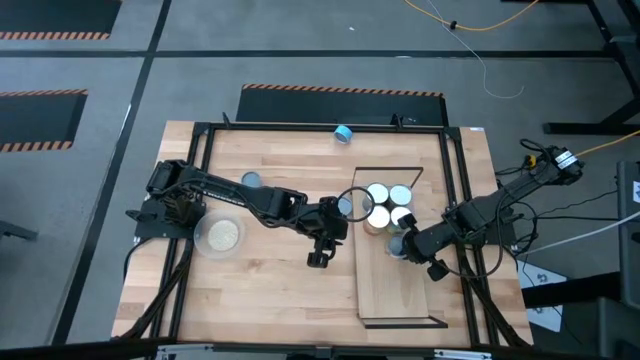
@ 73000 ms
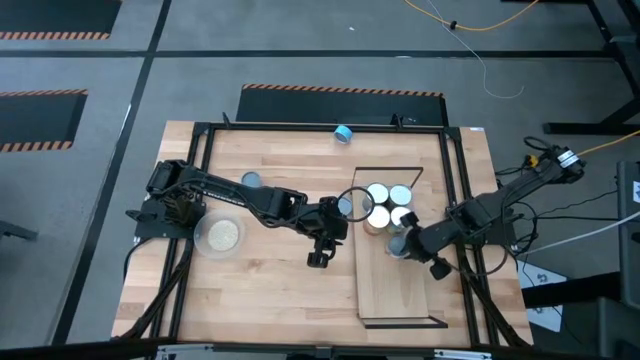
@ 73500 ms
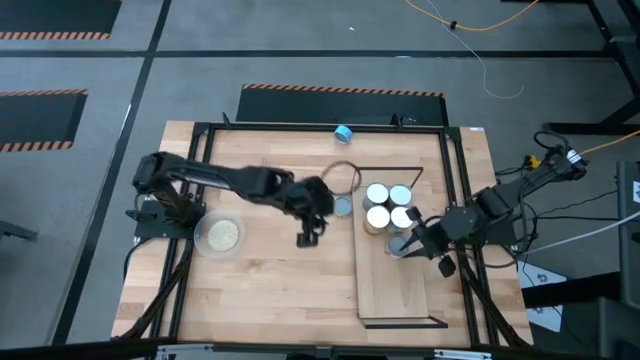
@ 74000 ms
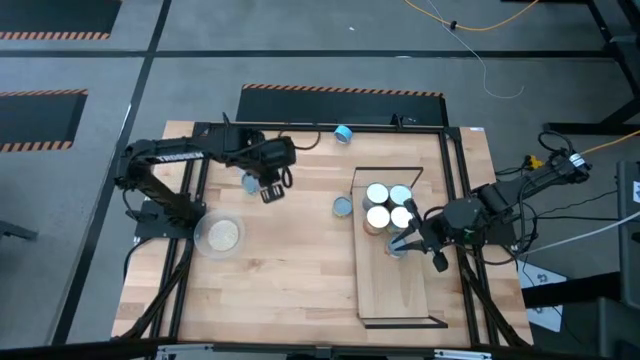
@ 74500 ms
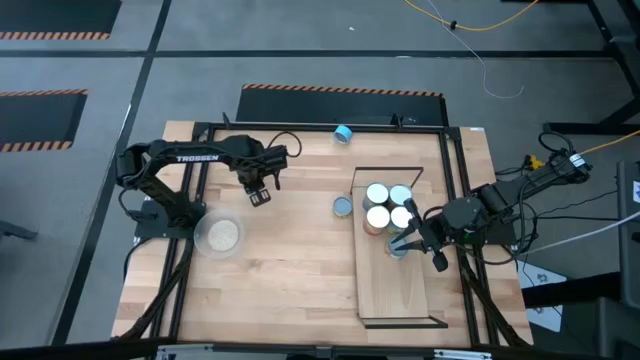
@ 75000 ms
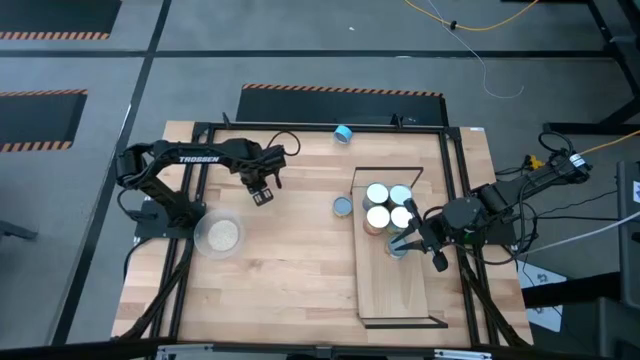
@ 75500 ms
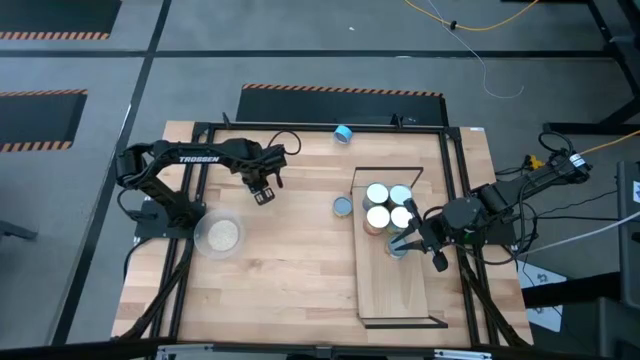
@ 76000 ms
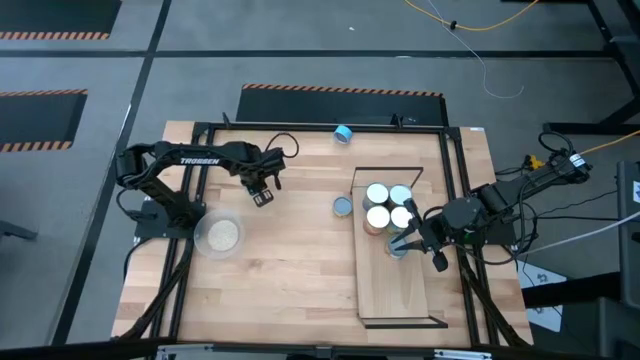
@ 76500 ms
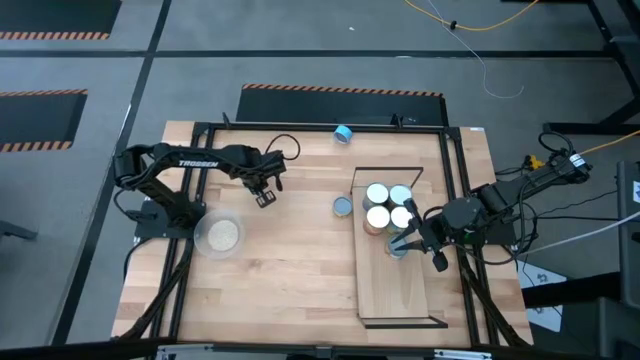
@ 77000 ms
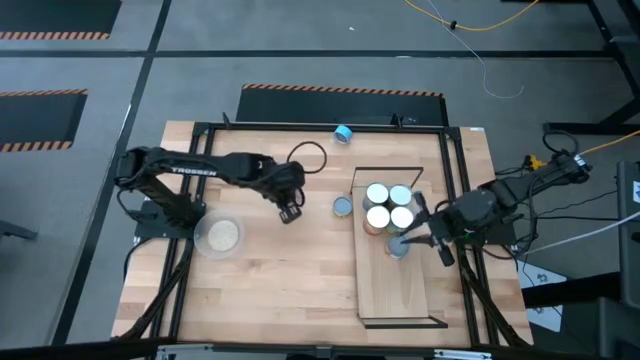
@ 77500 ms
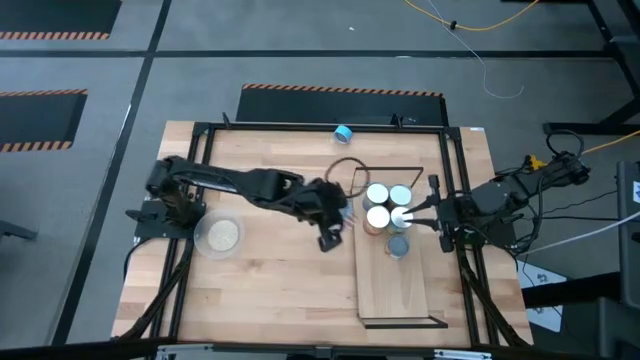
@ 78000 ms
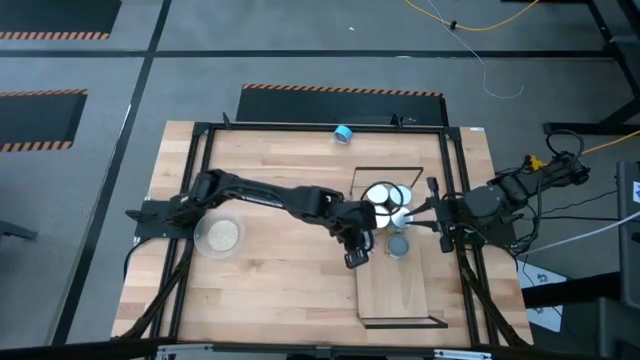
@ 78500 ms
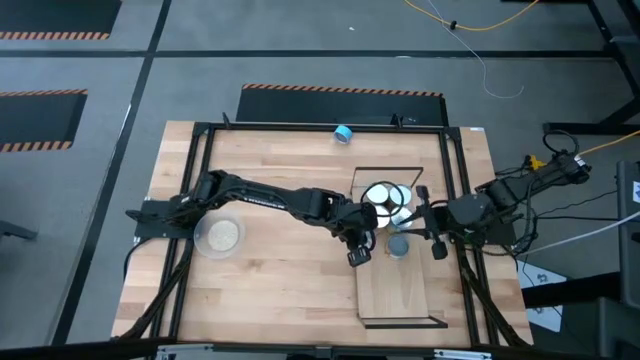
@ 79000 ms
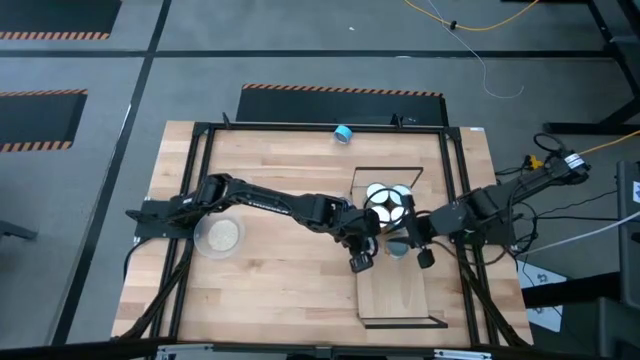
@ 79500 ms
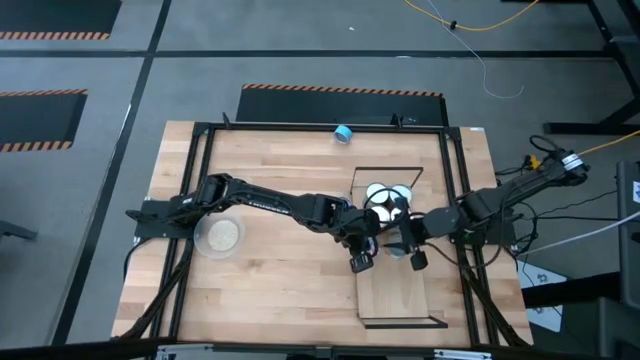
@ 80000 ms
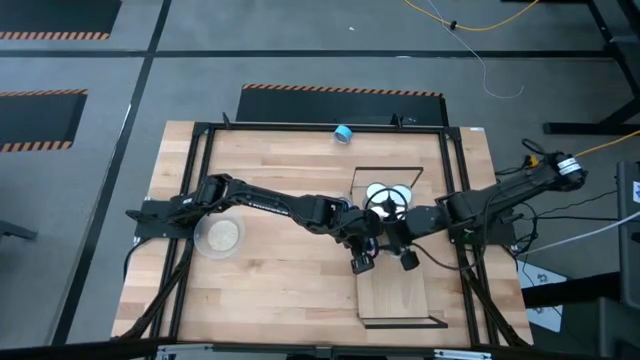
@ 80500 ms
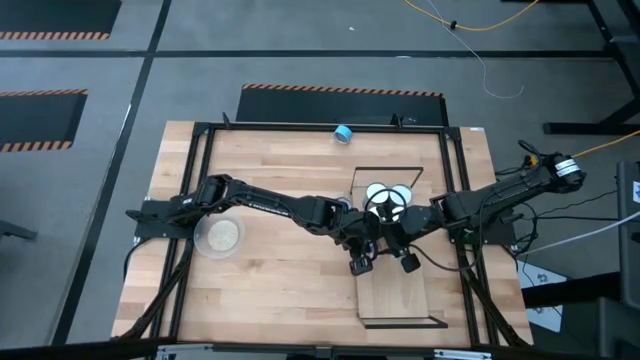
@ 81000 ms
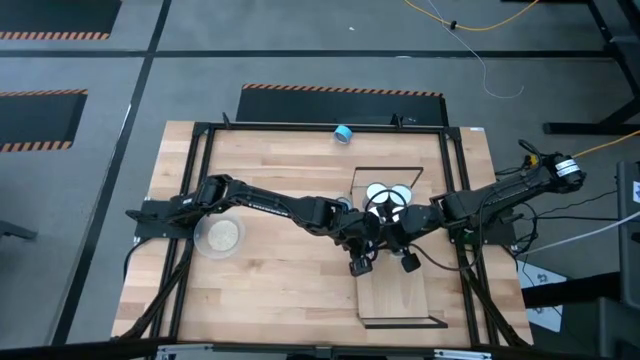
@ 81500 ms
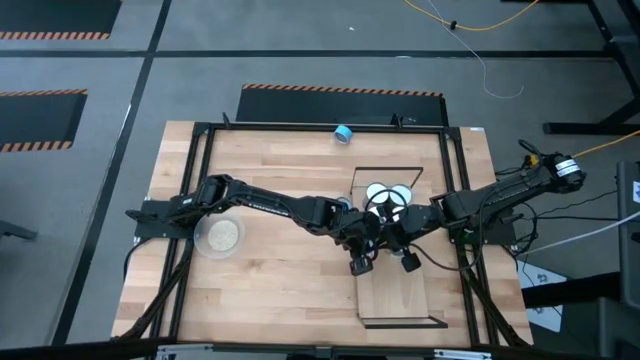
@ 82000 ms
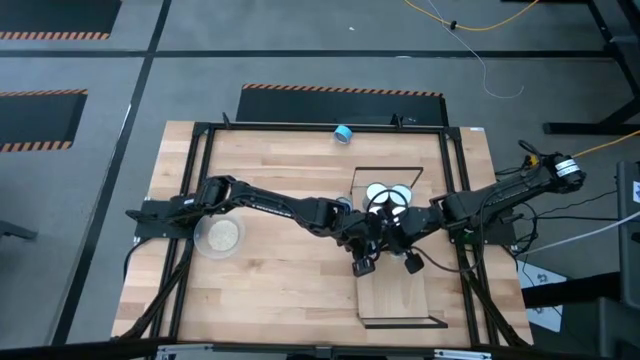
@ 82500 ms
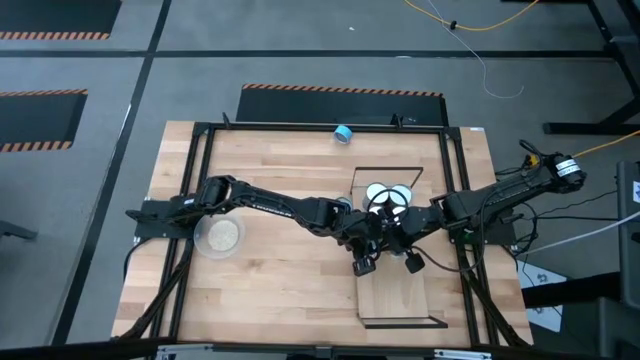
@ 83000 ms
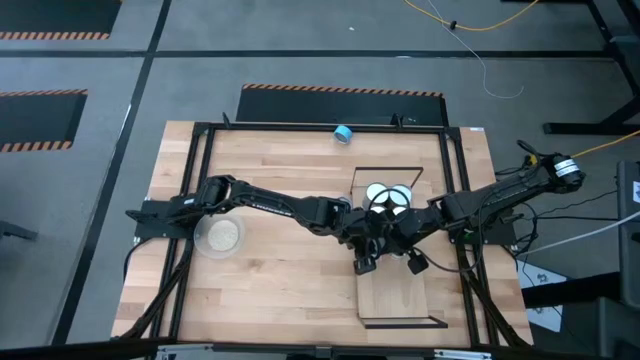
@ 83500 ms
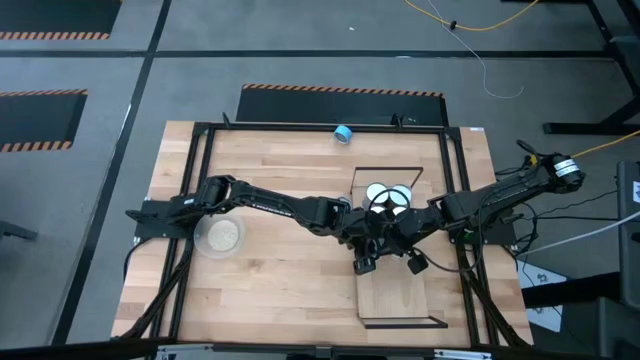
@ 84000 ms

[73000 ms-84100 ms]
Task: Pick and place cans onto a shelf
Put the white can on the shelf aligned with the green can
